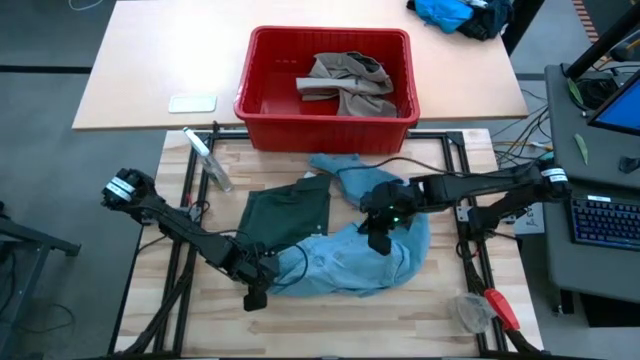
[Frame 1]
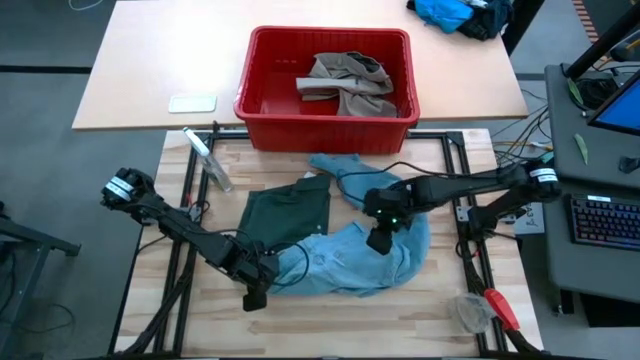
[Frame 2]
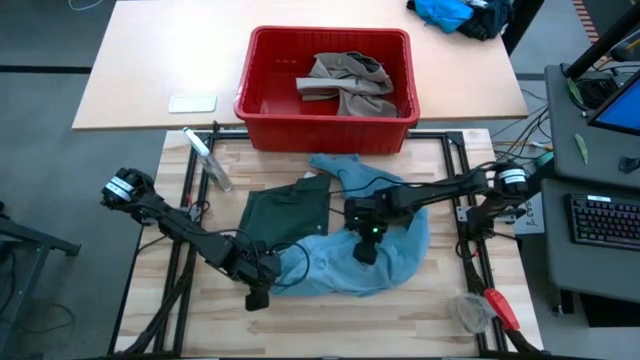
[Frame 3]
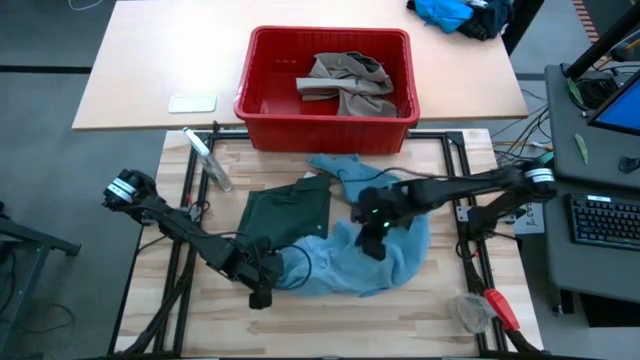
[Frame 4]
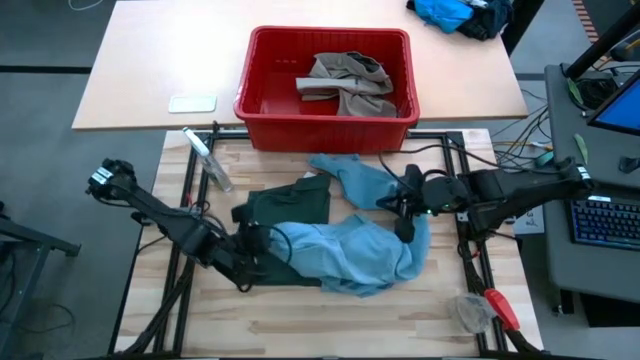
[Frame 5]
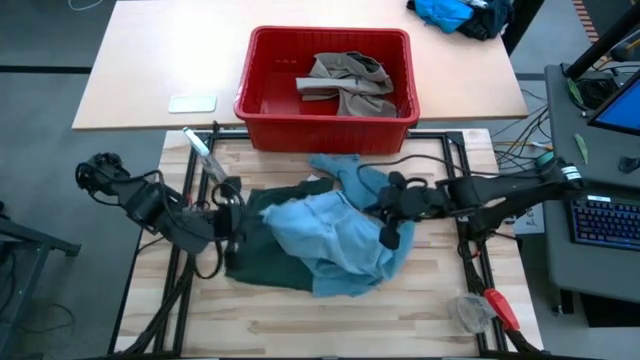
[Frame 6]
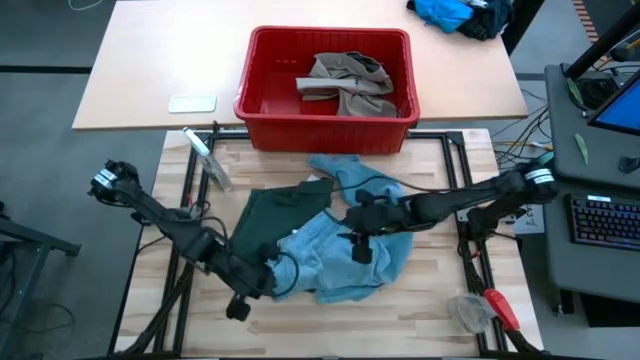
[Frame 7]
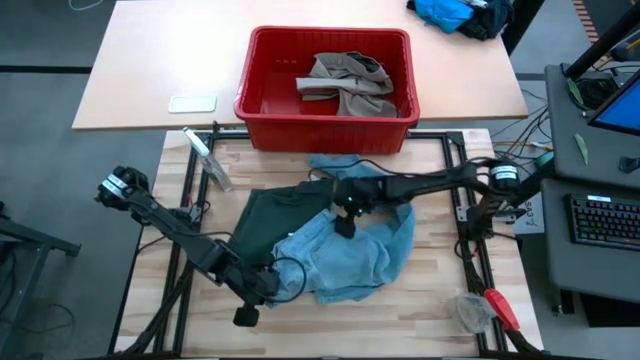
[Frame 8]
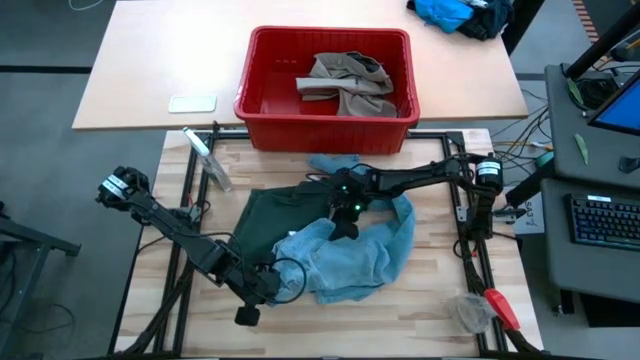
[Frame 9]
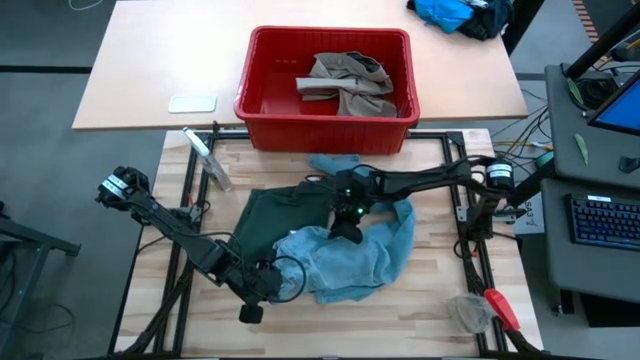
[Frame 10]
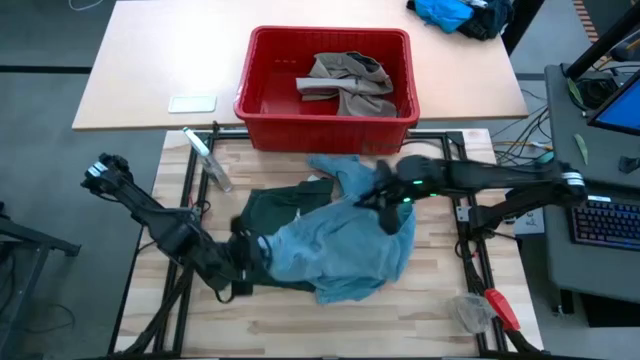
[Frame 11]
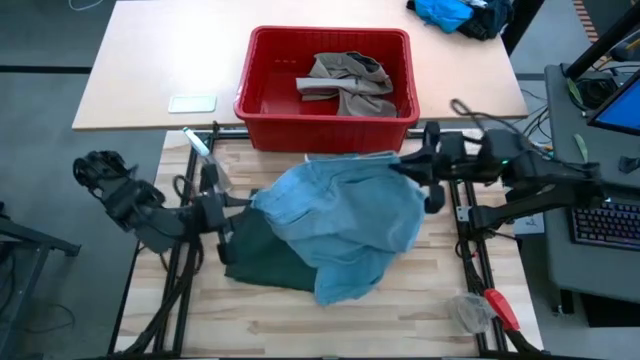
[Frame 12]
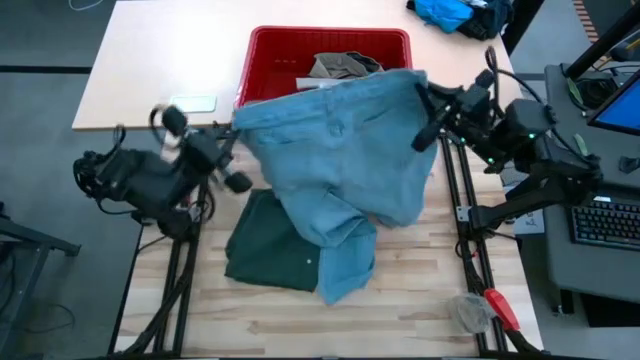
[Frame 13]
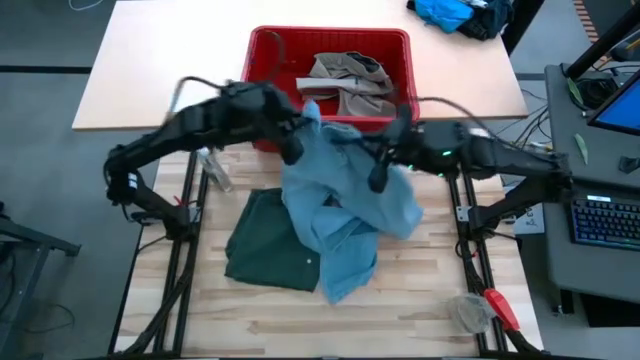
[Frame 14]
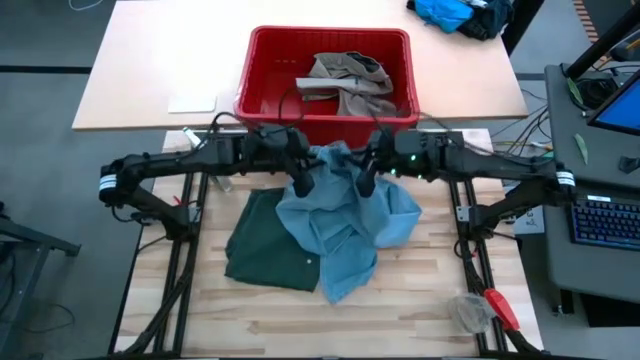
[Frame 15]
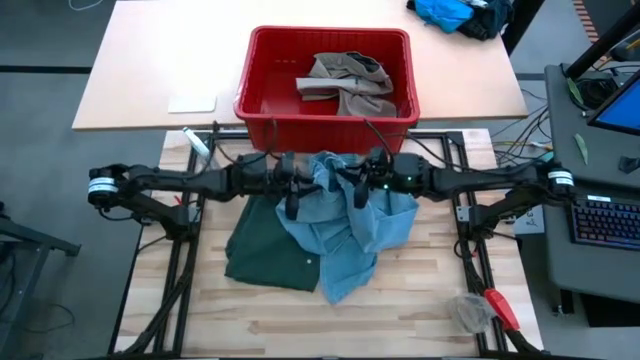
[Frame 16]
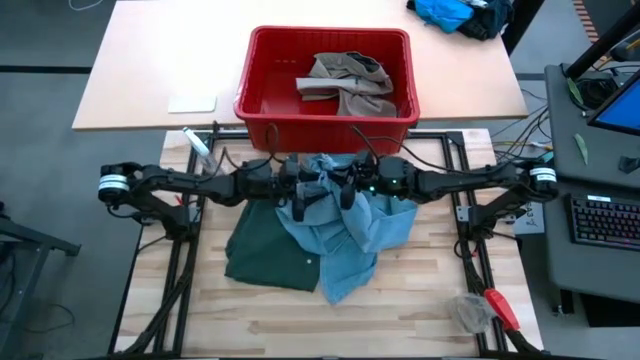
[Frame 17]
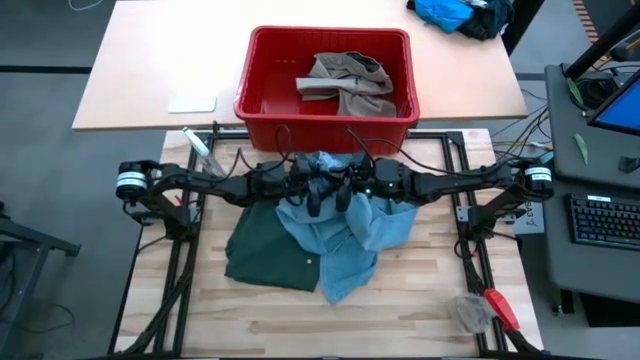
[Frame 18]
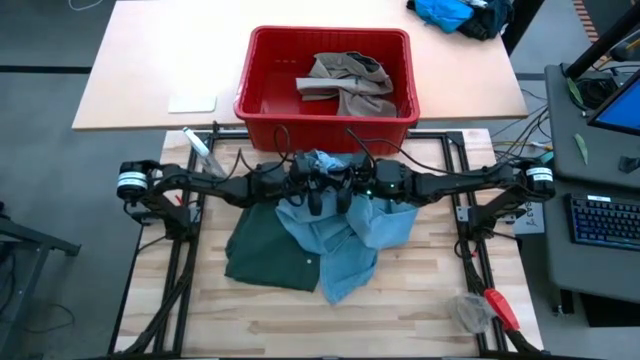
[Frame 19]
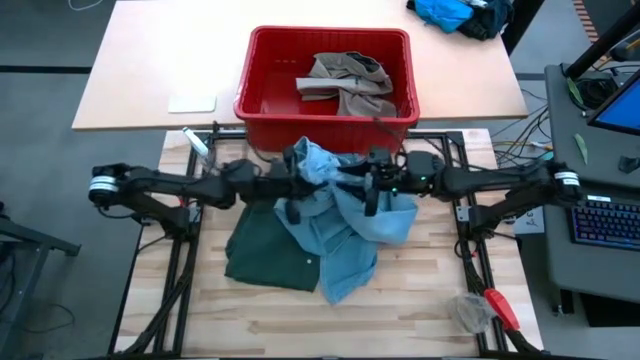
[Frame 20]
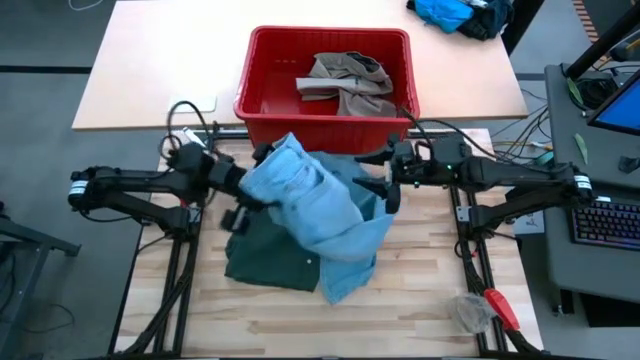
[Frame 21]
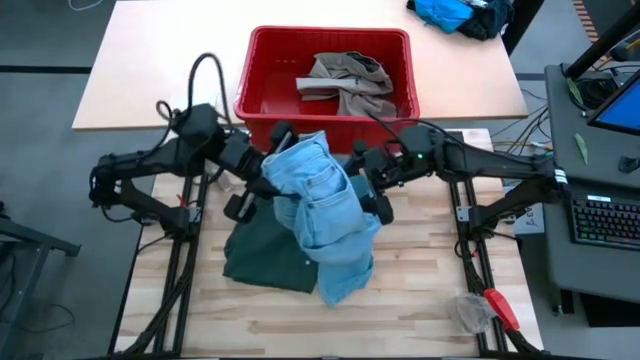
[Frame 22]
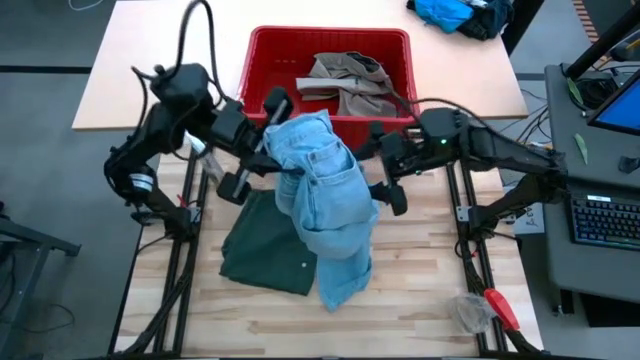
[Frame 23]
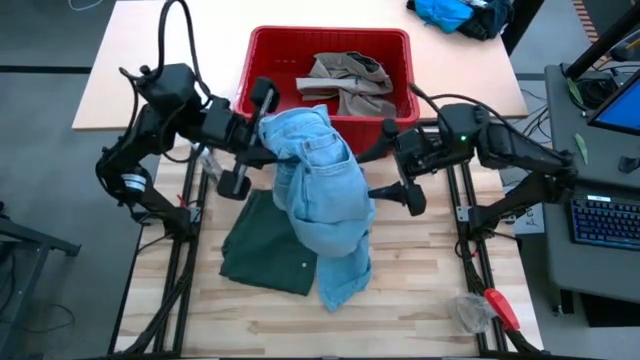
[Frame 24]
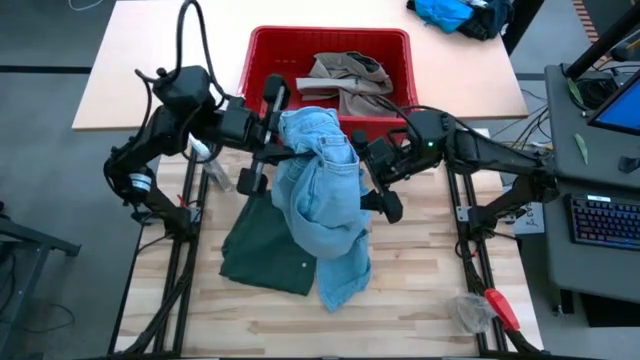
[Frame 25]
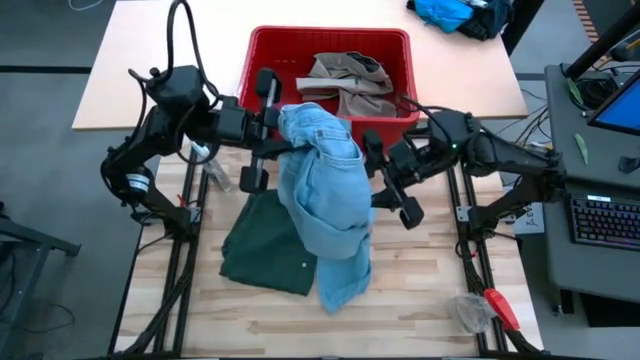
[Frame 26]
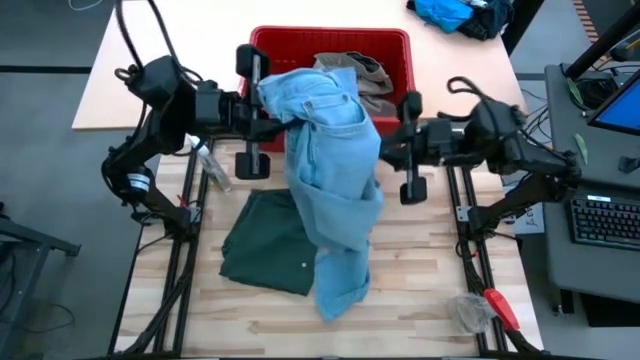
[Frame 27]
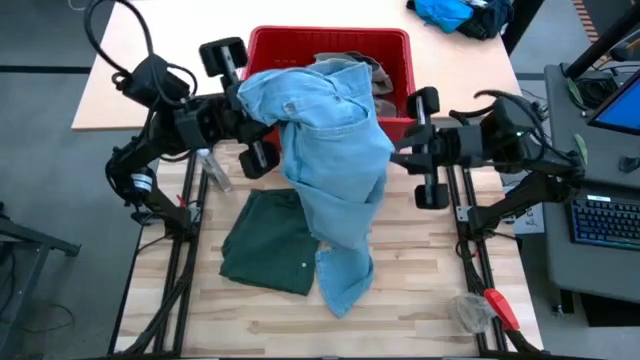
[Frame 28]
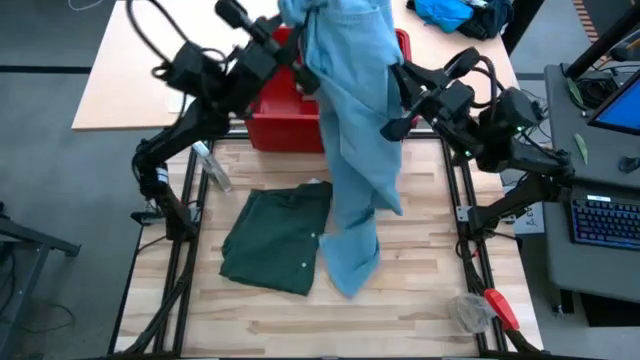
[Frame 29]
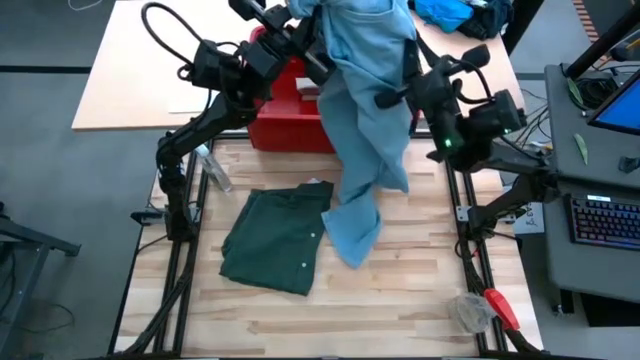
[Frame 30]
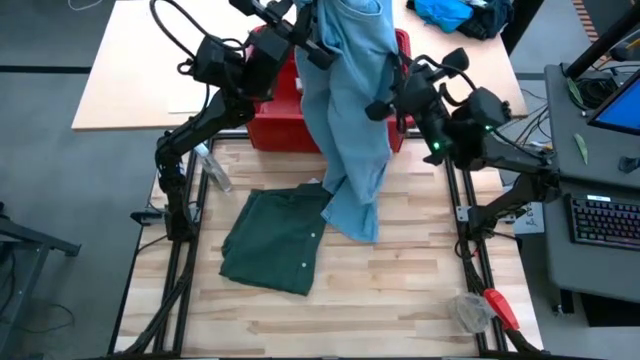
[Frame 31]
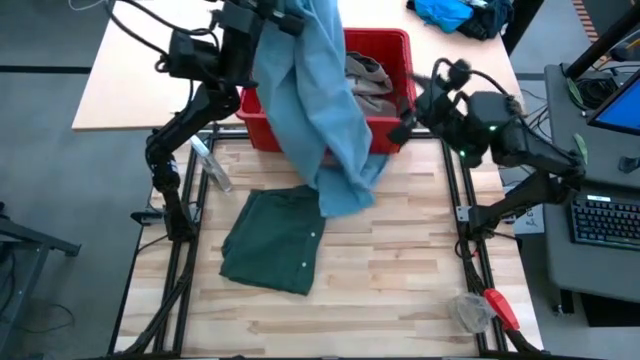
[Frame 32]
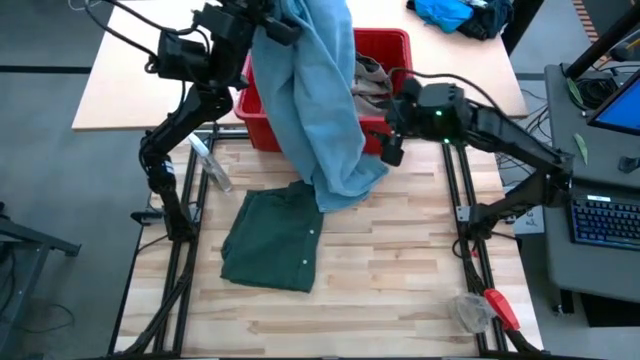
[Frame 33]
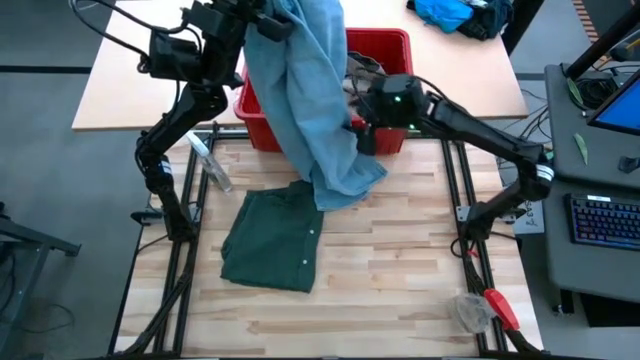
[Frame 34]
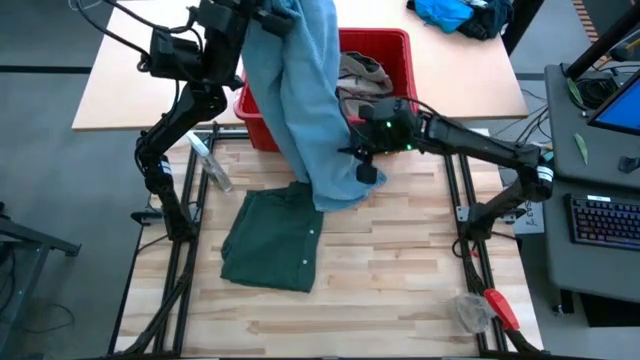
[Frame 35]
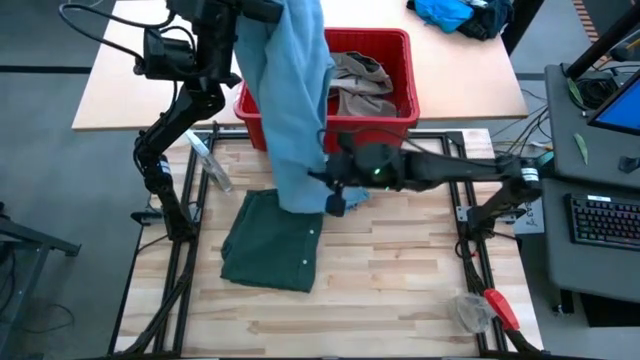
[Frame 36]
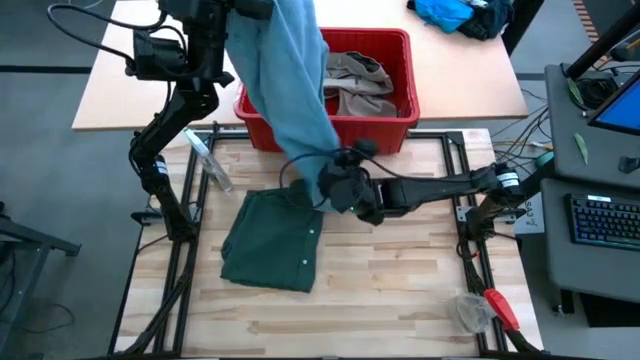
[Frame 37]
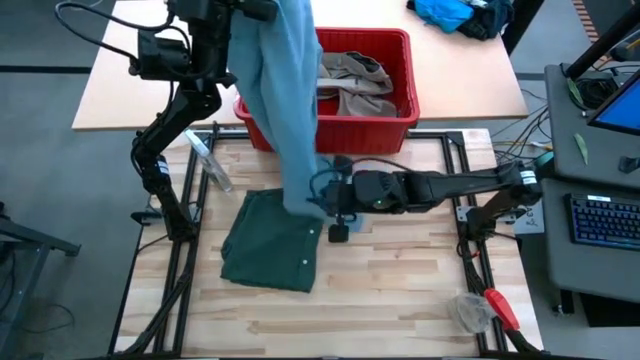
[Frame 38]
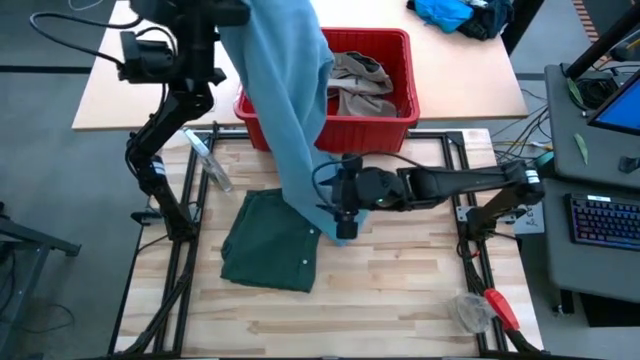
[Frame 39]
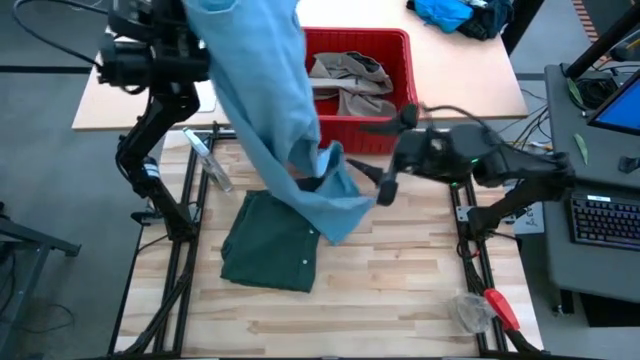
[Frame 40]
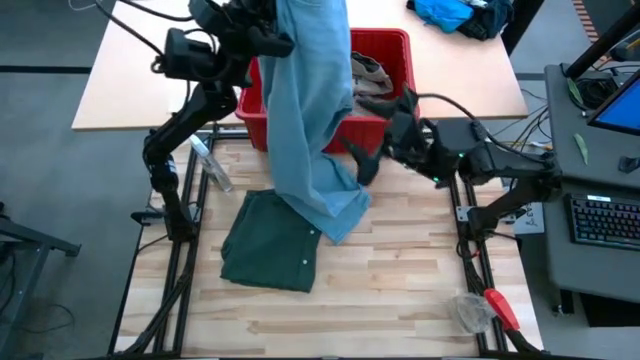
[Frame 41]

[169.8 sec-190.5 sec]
Task: Fold Laundry from Bin
Fold the blue jeans
